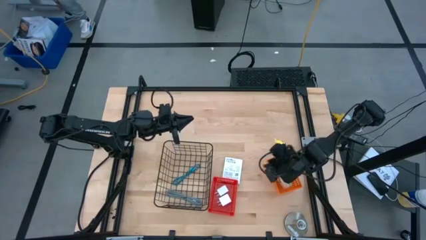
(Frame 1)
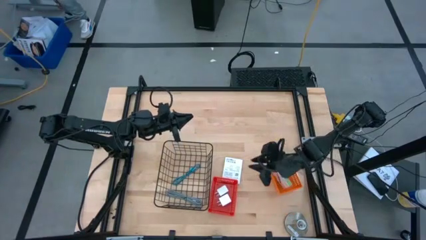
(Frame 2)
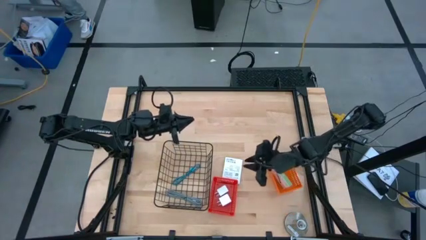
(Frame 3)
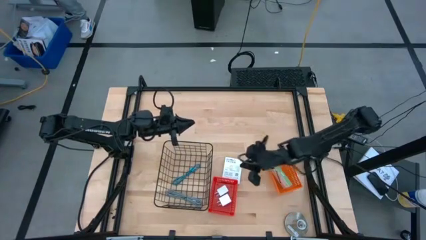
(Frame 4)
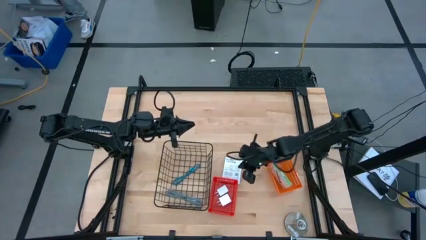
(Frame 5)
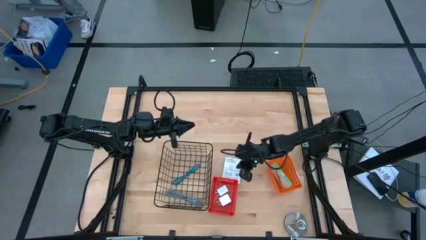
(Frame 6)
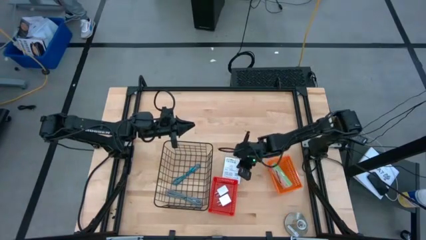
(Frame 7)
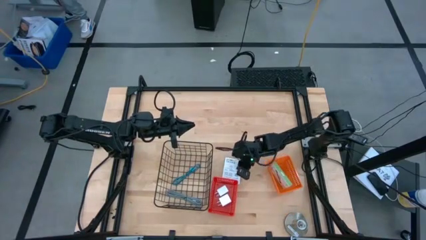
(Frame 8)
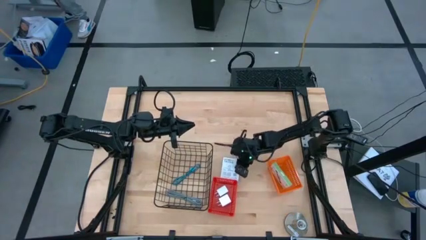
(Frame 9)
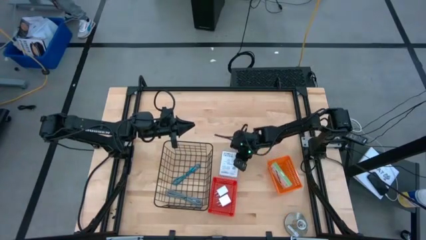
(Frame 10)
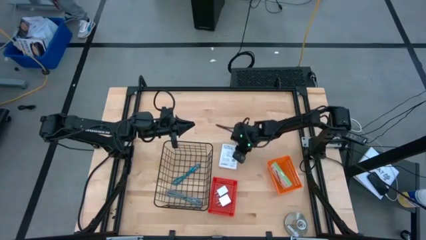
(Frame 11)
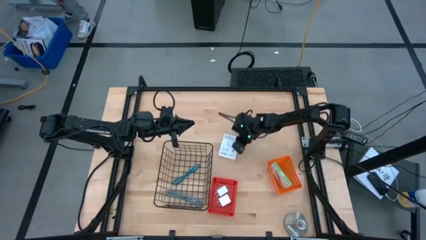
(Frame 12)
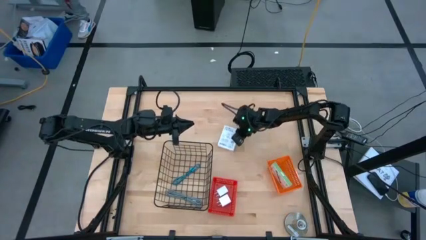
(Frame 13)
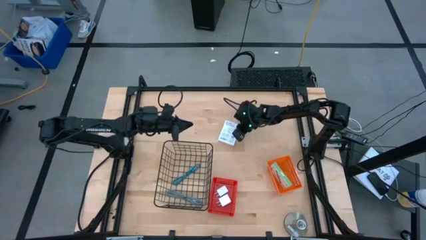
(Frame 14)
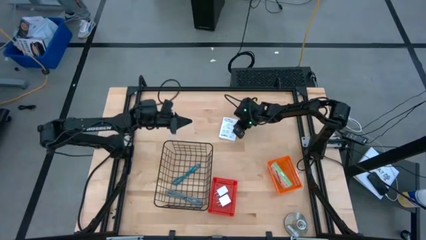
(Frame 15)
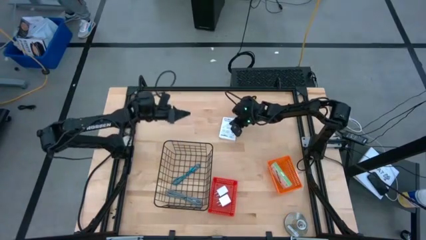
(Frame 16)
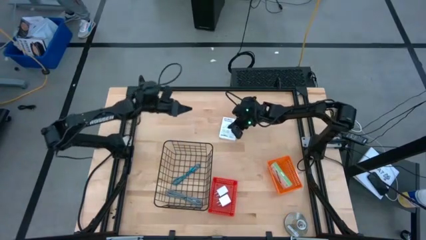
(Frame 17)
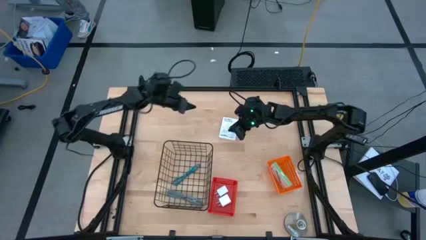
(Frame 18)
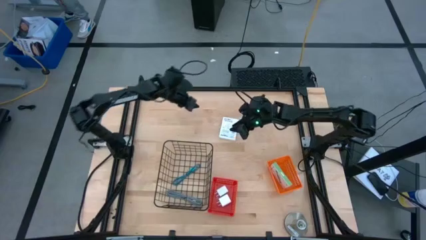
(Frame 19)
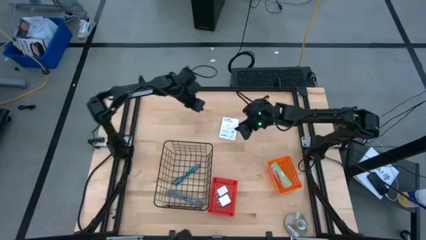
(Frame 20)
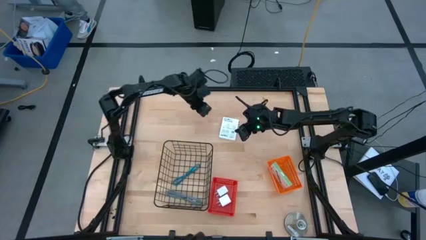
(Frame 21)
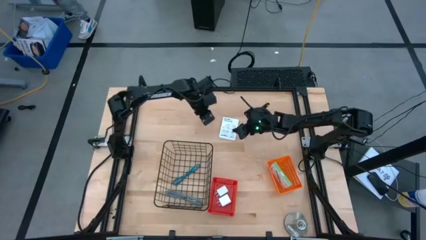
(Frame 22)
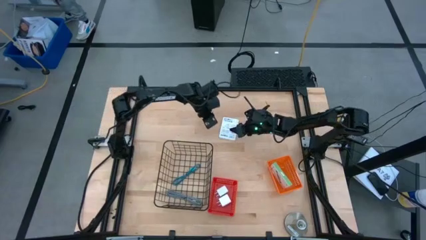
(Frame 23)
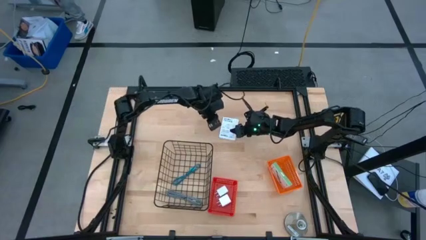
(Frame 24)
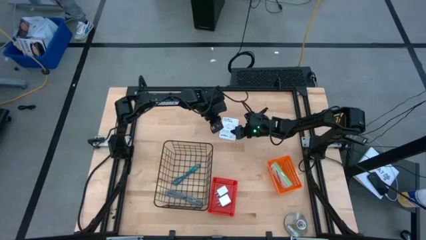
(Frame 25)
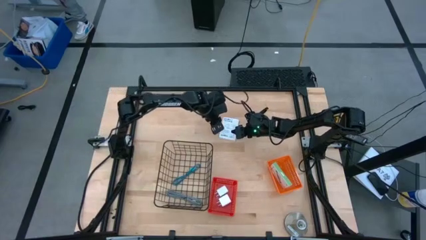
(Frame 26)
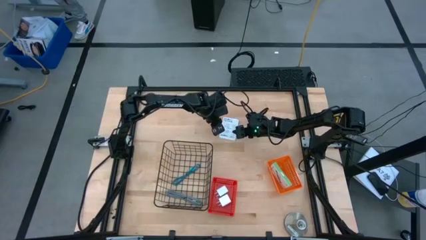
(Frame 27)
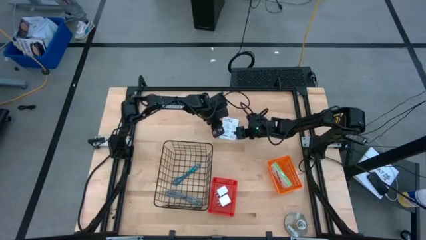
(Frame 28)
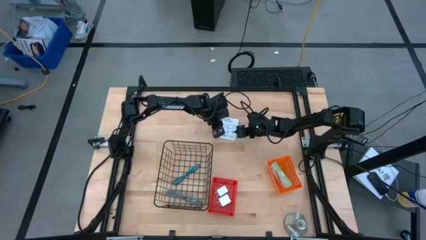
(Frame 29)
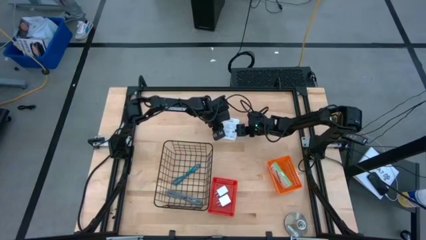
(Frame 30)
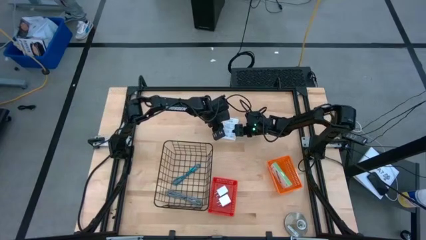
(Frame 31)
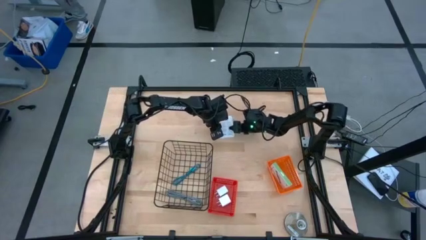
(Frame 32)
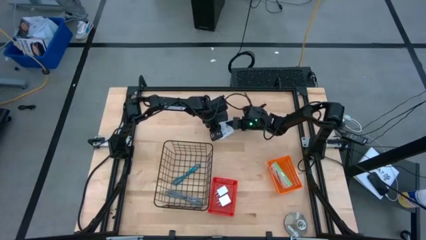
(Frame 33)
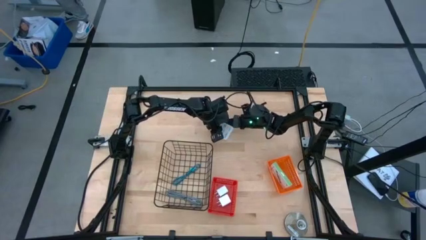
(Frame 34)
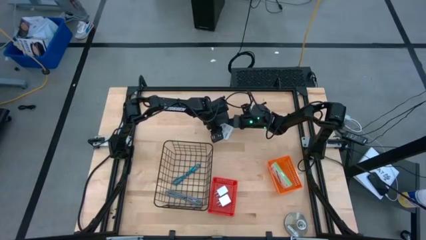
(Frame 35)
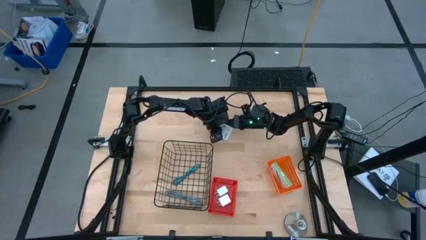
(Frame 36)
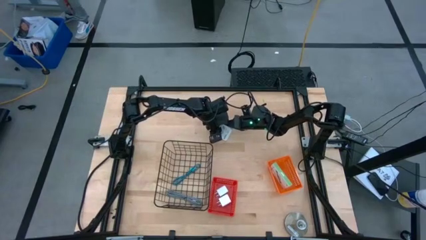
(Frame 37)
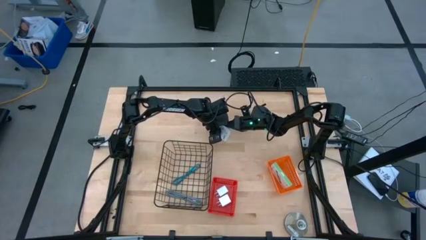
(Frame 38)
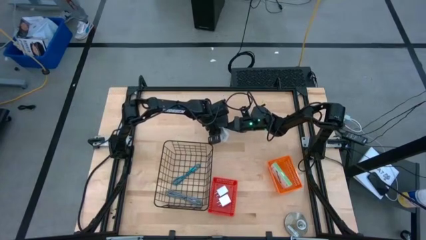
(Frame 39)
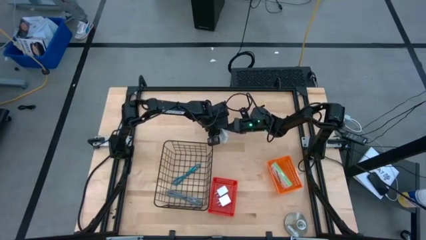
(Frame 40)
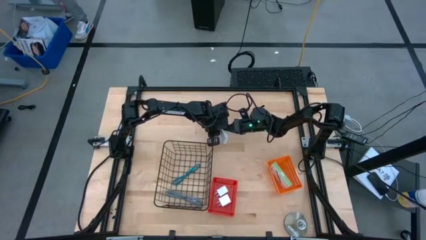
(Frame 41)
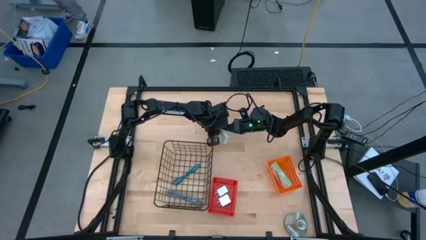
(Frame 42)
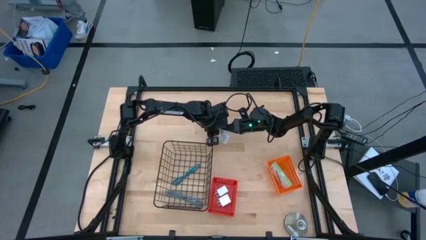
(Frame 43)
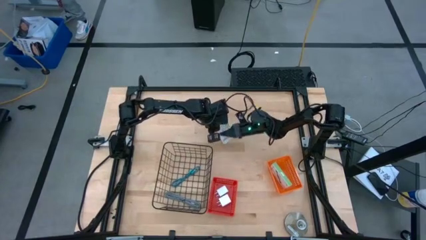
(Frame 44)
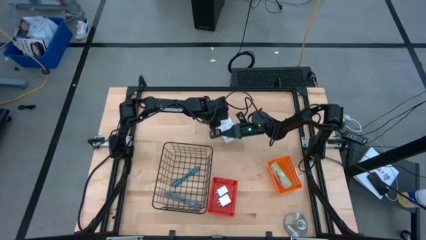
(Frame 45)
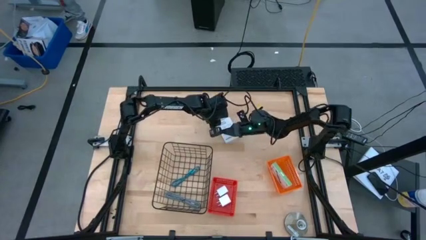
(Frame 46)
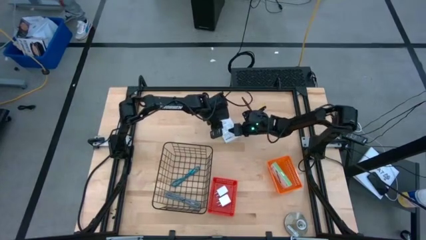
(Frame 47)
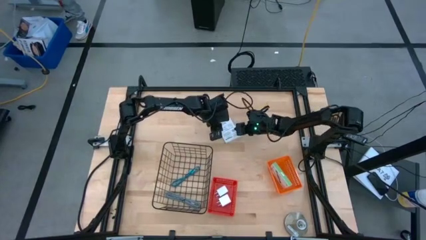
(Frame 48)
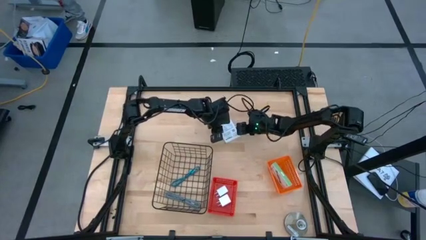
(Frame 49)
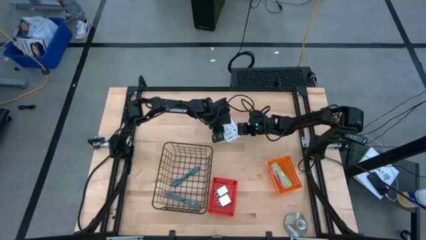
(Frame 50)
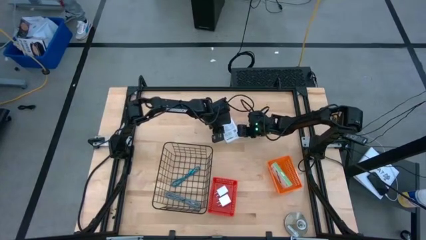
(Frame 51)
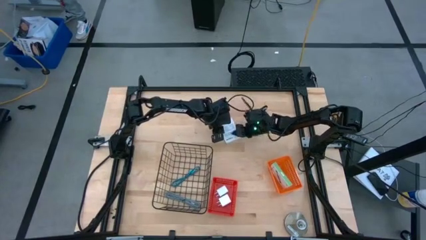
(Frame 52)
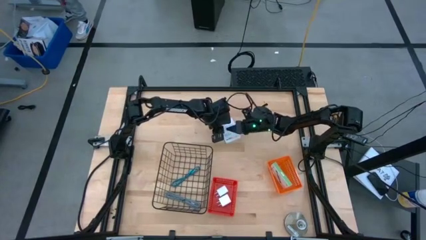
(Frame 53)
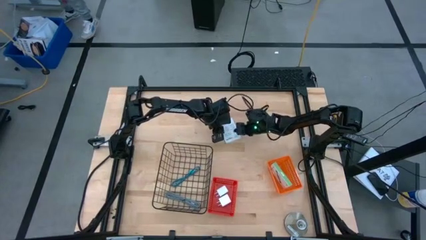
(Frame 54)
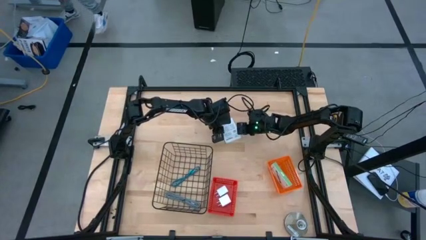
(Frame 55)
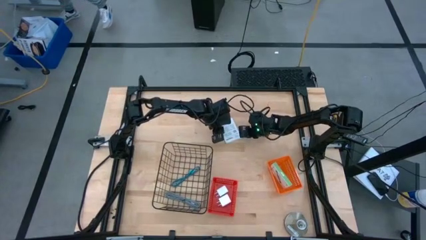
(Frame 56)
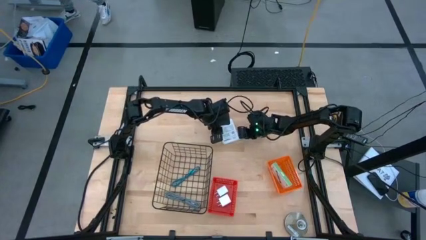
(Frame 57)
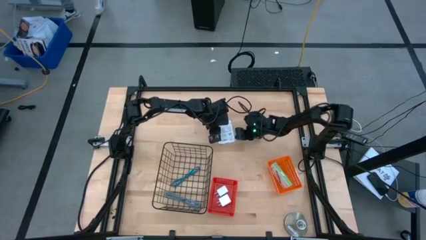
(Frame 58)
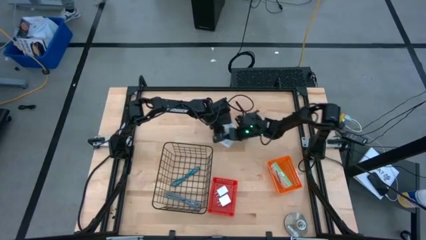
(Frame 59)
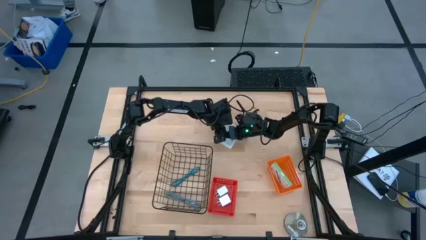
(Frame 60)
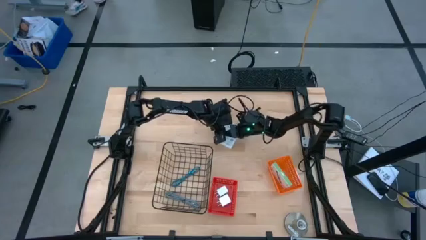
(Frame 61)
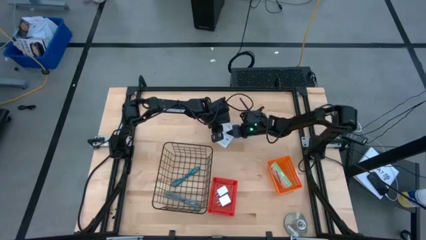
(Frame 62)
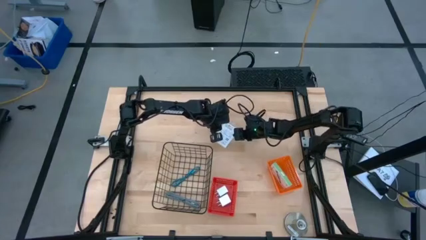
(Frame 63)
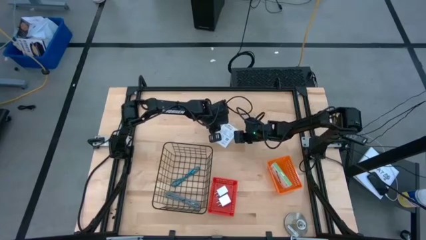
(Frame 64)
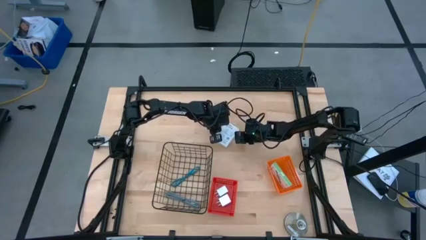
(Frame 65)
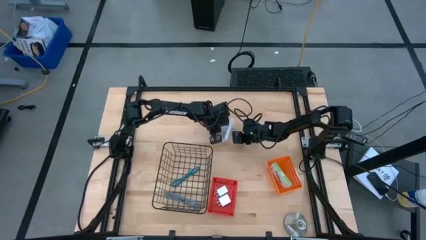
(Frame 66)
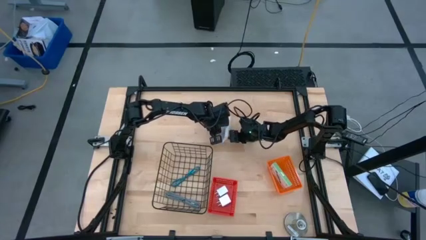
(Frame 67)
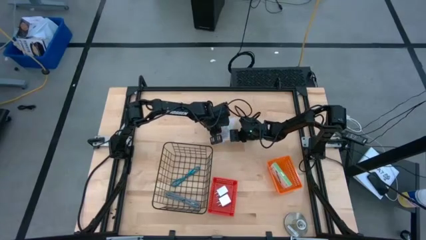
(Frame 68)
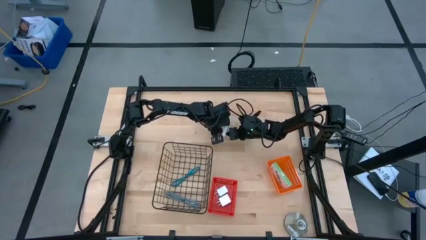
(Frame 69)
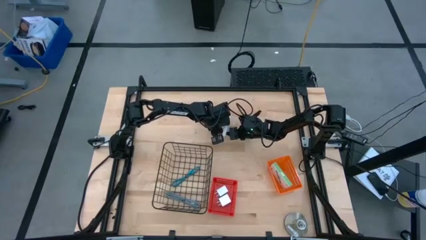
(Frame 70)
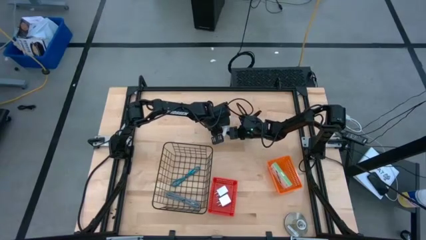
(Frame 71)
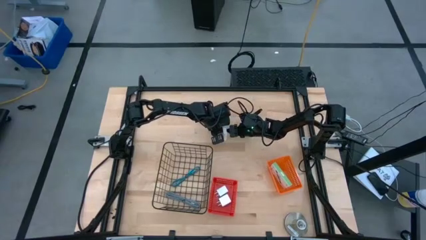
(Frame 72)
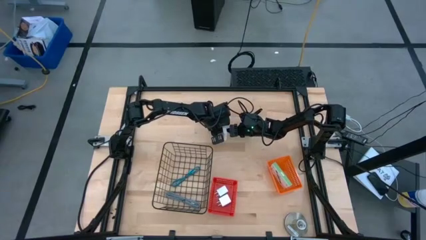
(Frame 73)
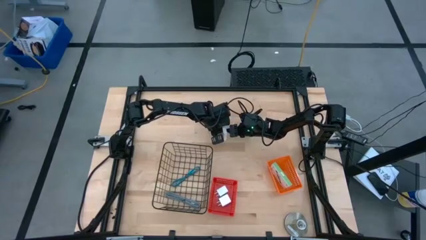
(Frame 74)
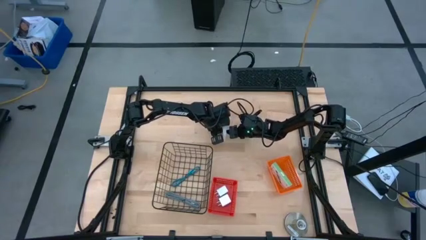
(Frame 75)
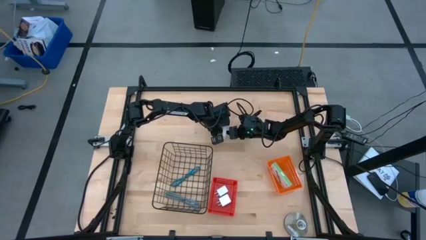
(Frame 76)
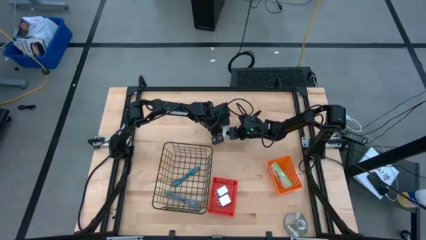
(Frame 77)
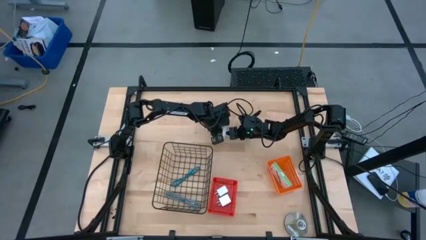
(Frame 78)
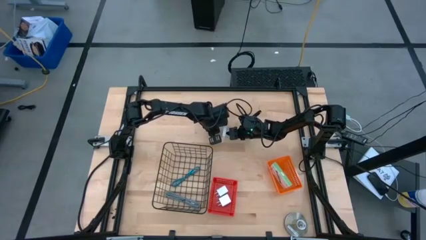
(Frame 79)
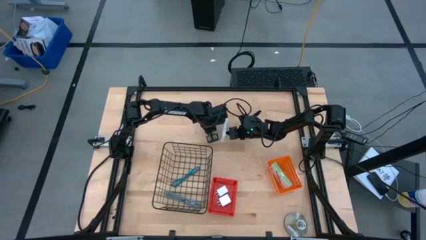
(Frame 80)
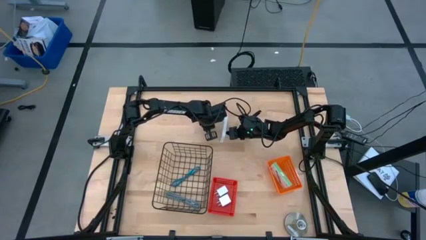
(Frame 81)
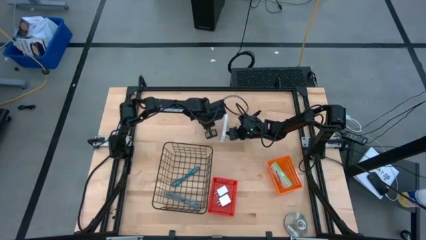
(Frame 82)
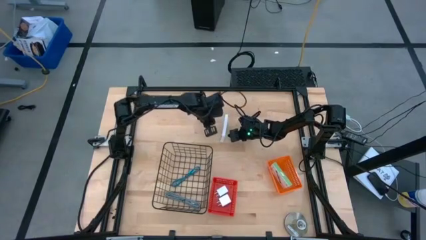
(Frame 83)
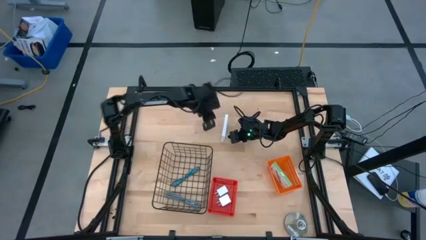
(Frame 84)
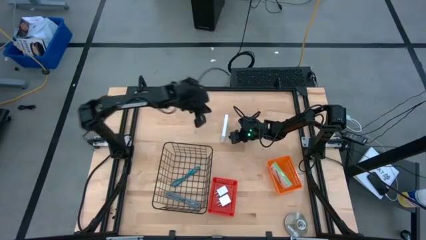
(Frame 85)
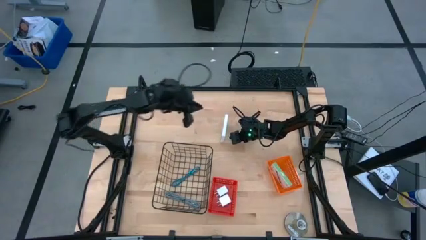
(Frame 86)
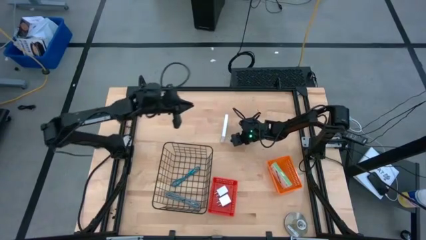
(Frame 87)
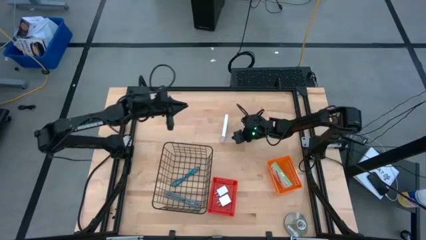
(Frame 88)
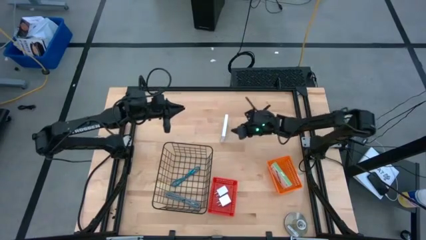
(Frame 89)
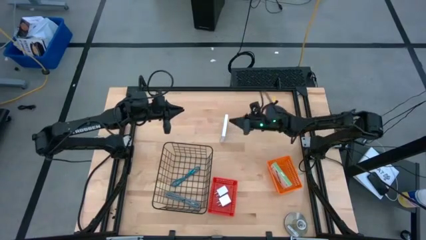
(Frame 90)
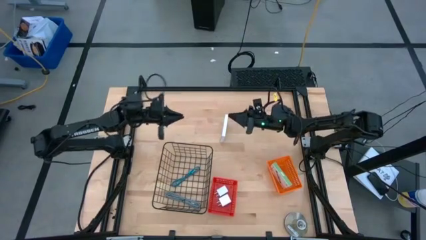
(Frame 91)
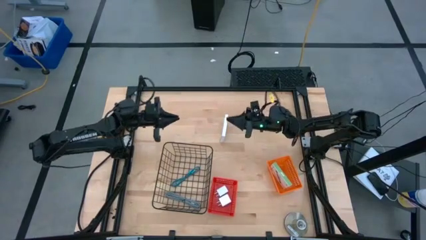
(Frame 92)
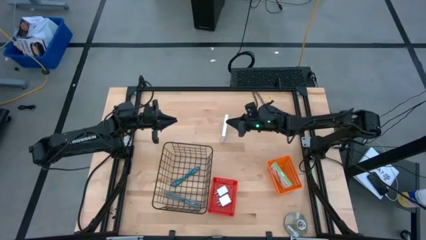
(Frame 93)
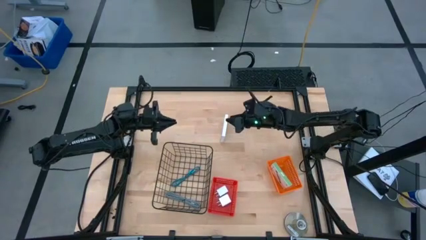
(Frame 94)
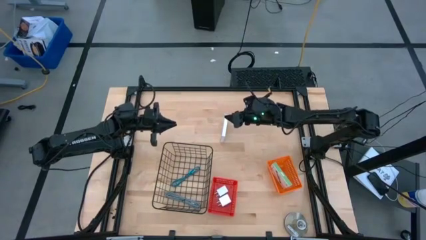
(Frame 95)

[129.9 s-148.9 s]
Task: Pick and place items into bin
Put the card reader box into the orange basket
